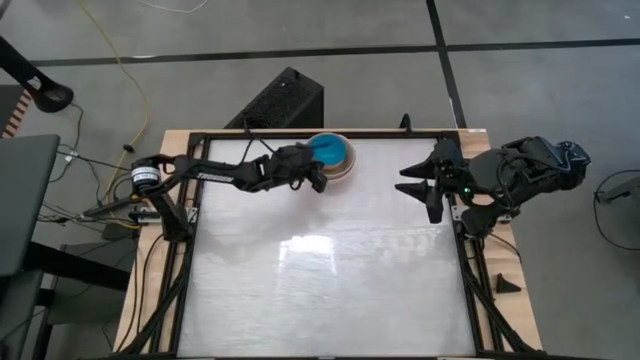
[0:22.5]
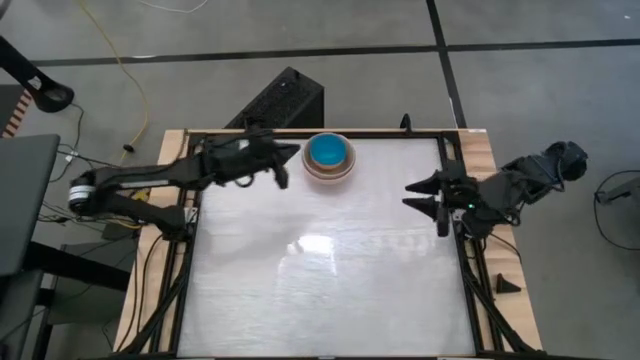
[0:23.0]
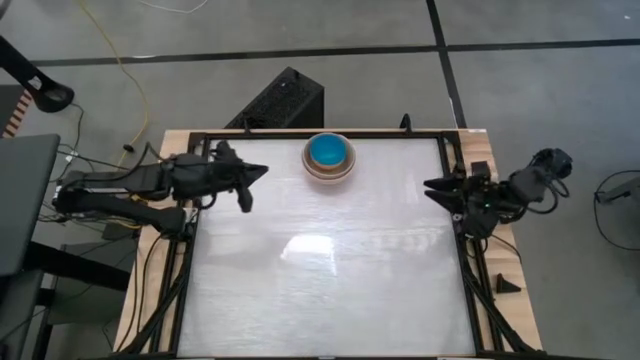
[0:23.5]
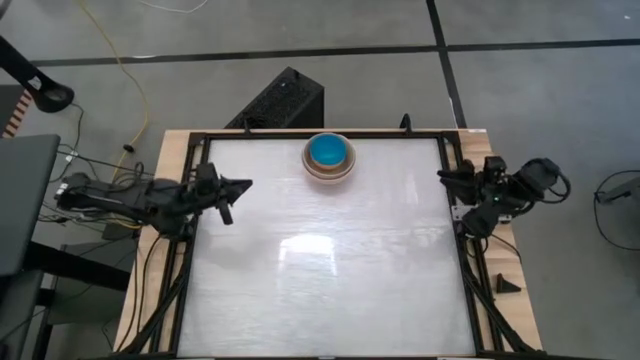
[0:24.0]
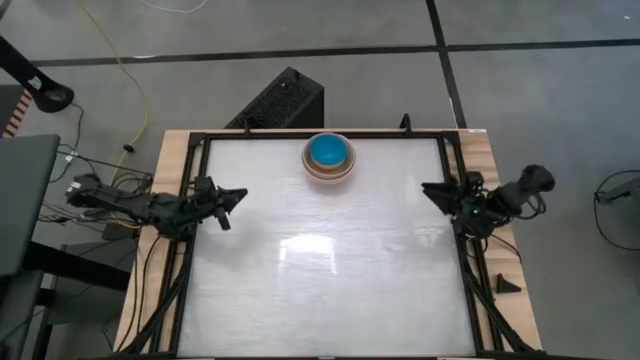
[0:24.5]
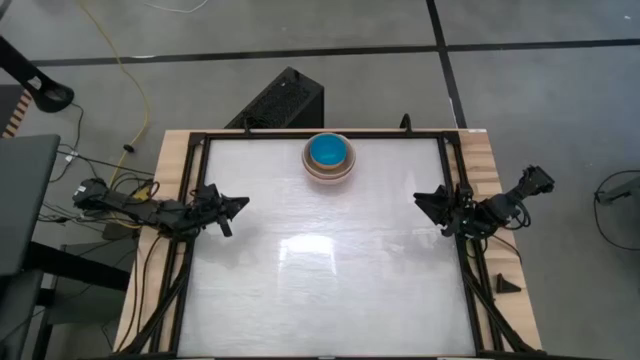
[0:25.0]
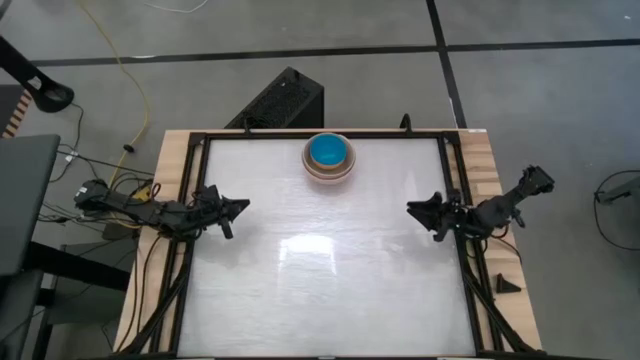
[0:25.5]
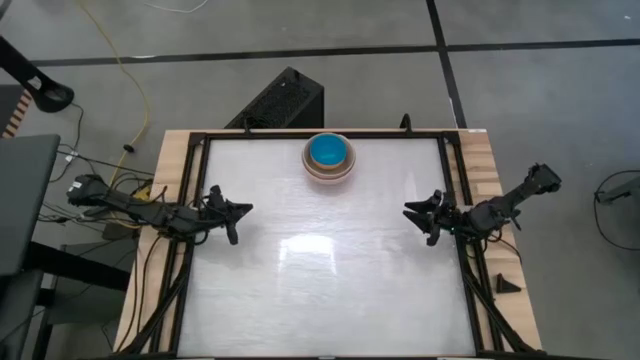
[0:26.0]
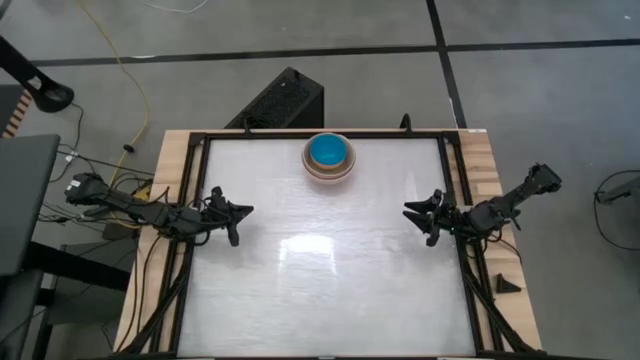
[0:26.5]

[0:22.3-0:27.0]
Return to Home Position

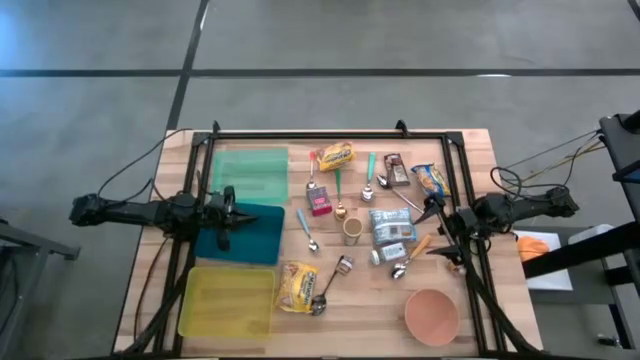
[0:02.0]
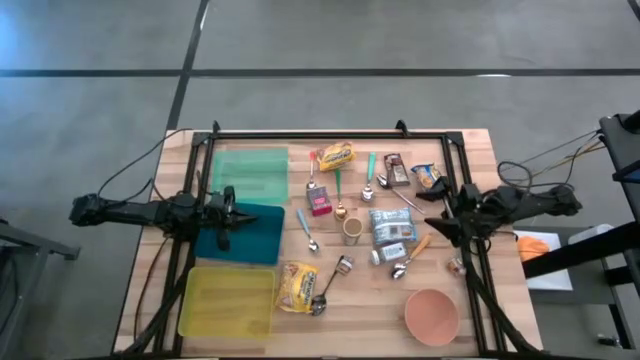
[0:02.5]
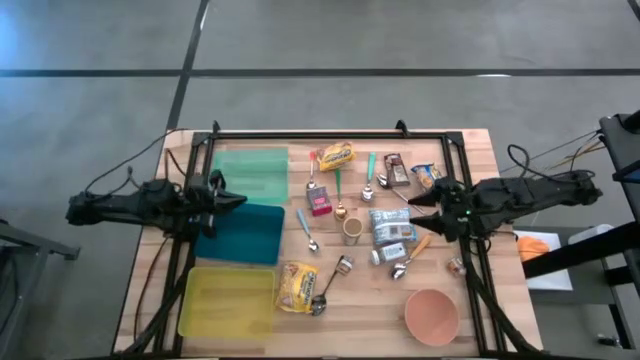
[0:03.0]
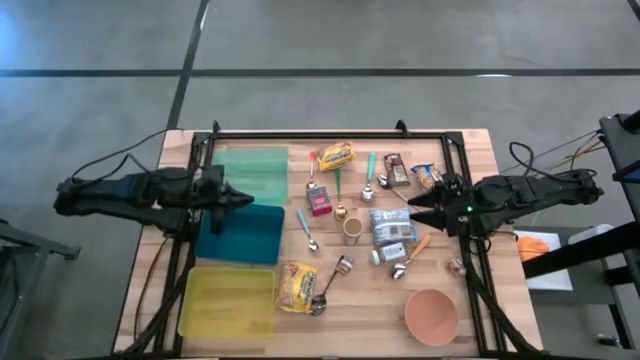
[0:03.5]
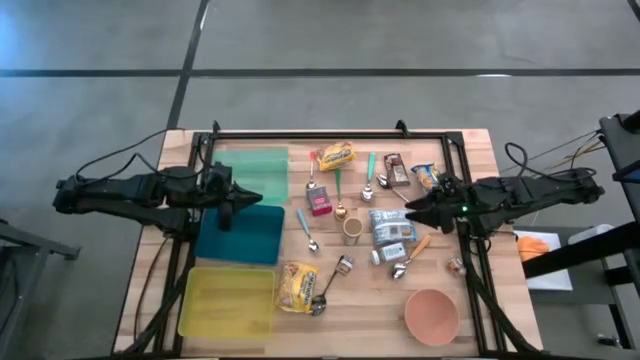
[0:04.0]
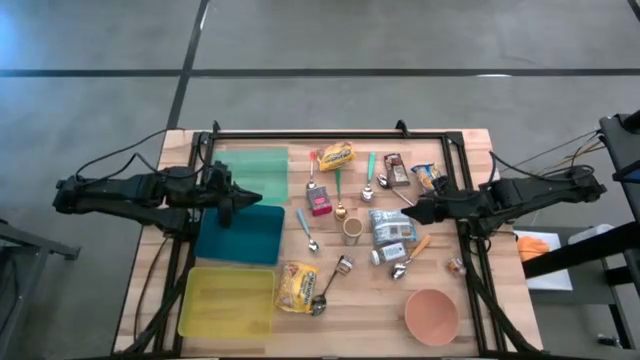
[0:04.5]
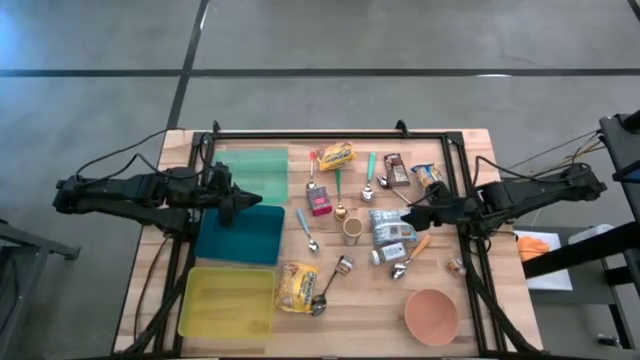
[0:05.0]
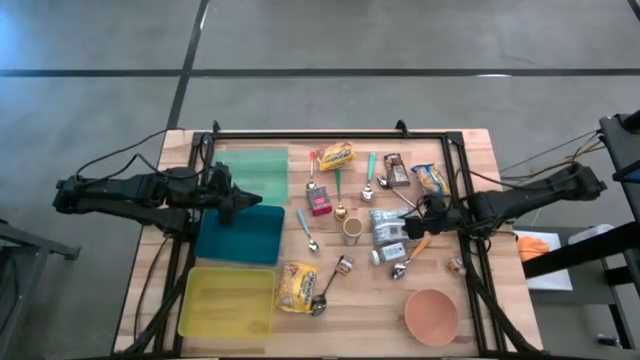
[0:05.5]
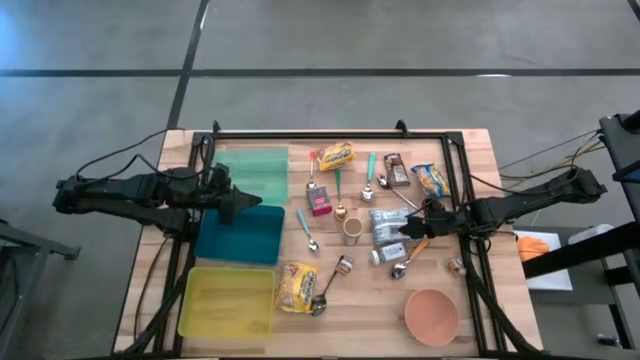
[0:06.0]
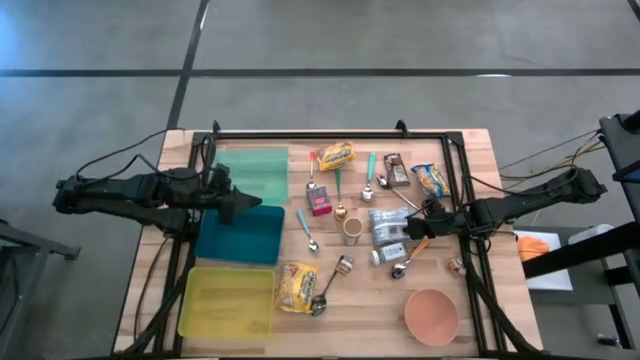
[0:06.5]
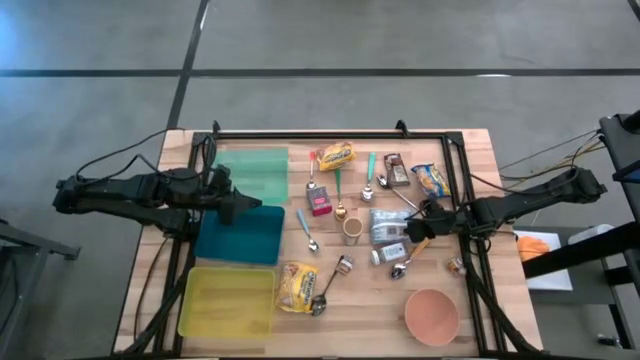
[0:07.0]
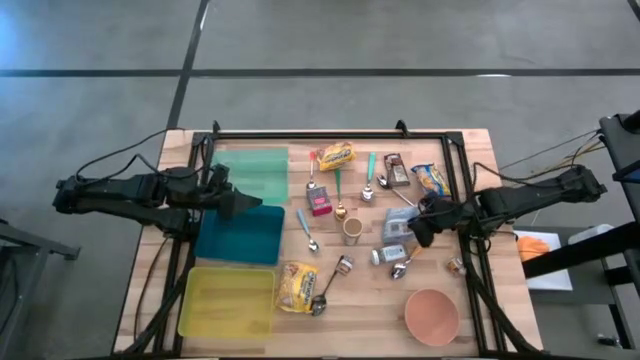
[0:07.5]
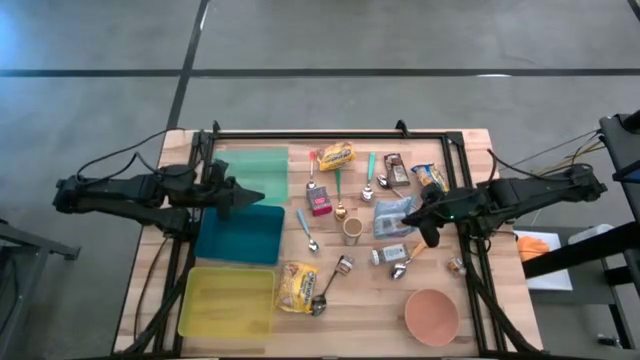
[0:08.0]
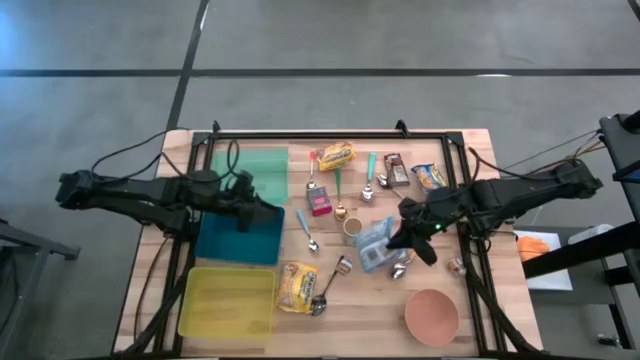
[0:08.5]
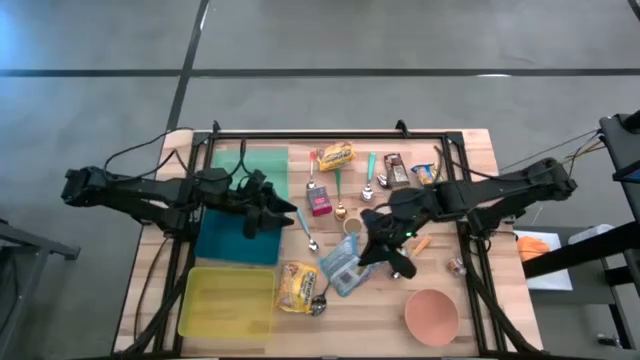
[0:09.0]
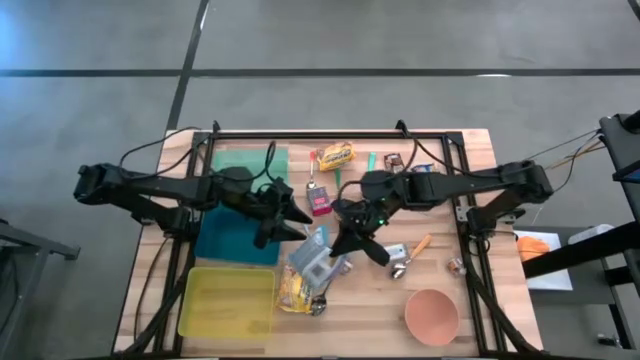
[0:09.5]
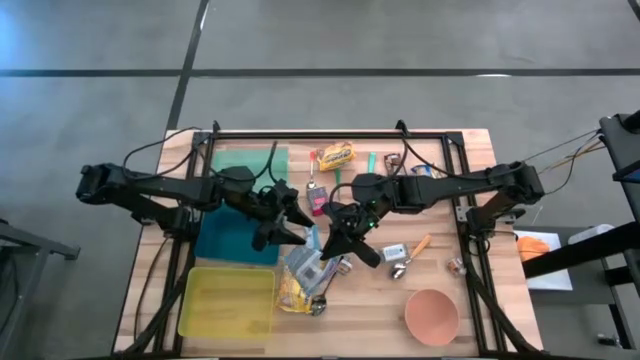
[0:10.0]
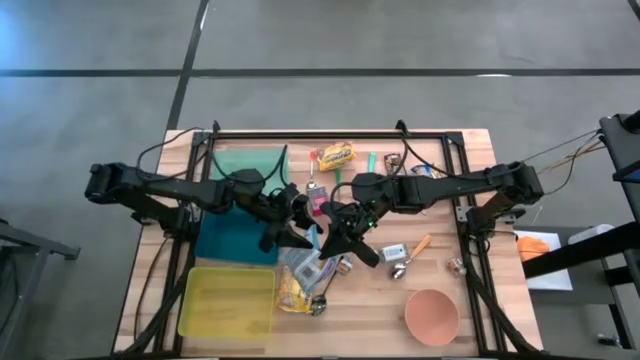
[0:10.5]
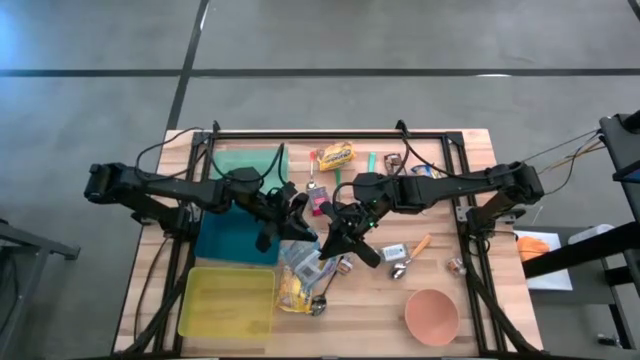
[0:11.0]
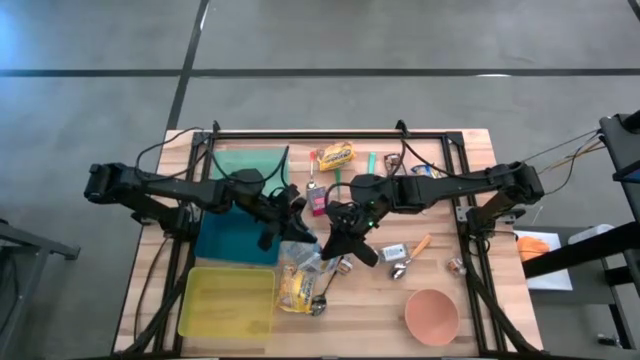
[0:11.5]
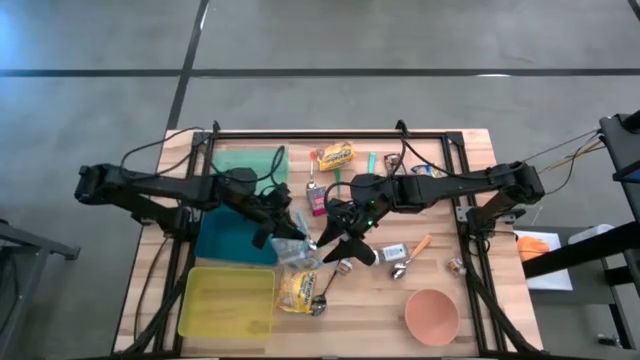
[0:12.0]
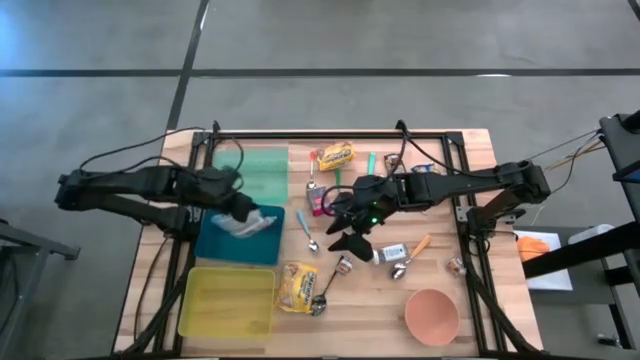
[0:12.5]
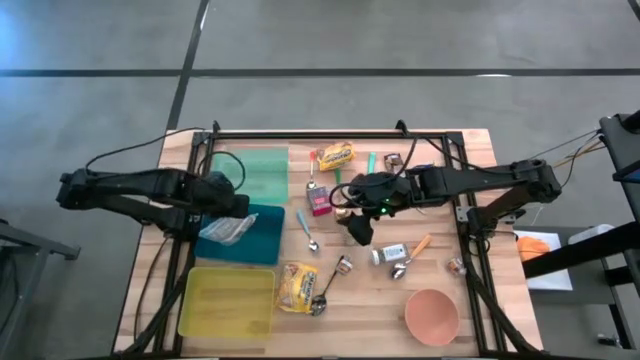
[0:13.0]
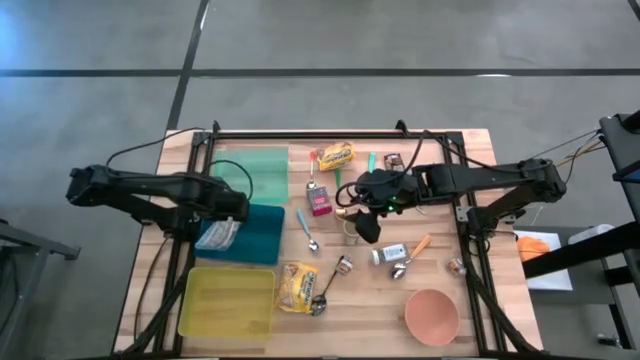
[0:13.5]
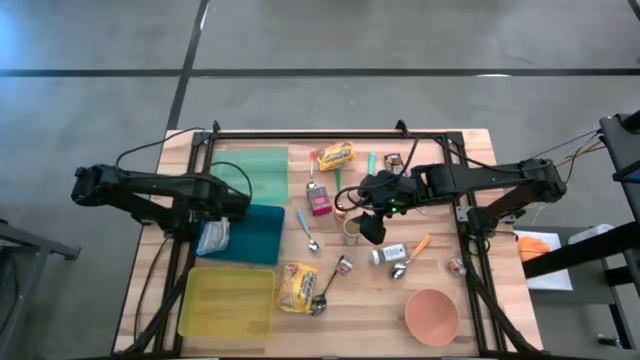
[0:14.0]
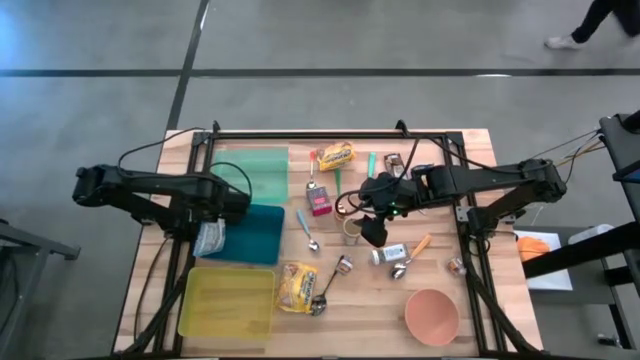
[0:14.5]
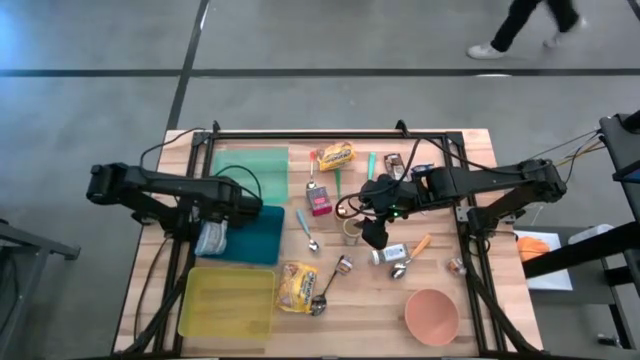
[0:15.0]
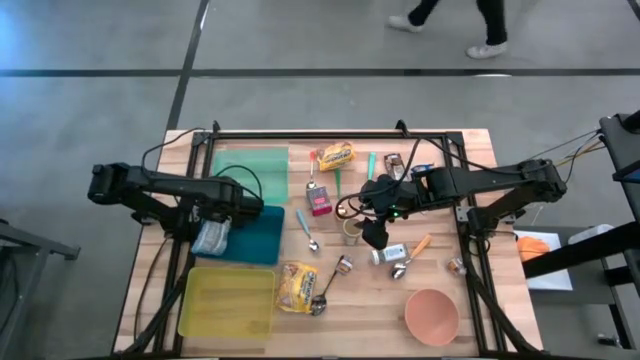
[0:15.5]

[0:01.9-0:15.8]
Put the light blue noodle pack into the dark blue bin
